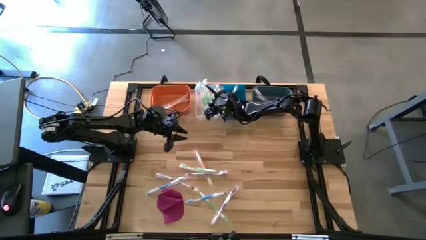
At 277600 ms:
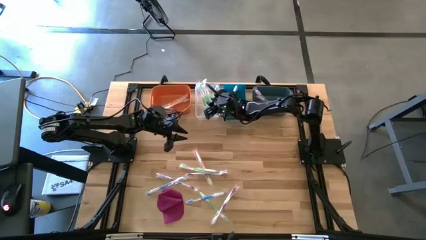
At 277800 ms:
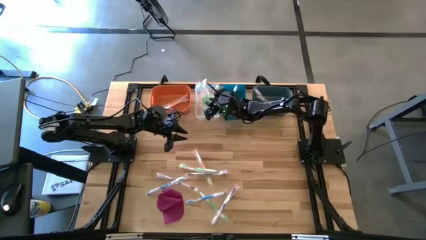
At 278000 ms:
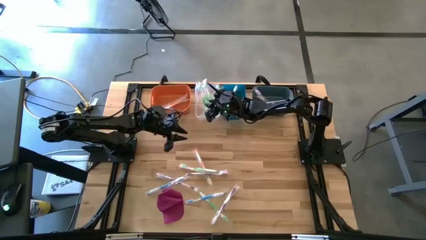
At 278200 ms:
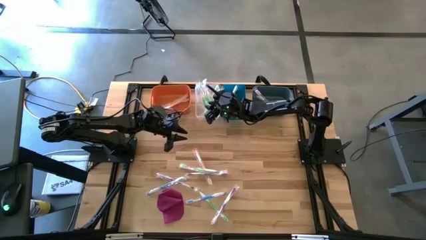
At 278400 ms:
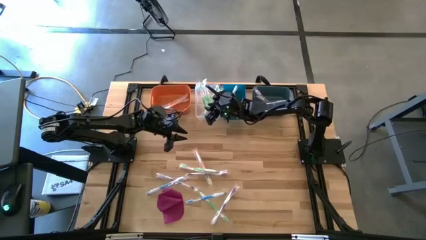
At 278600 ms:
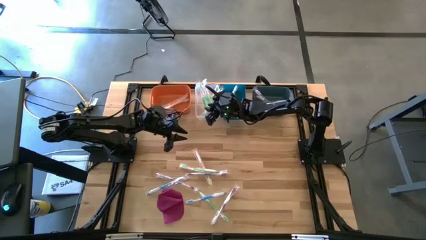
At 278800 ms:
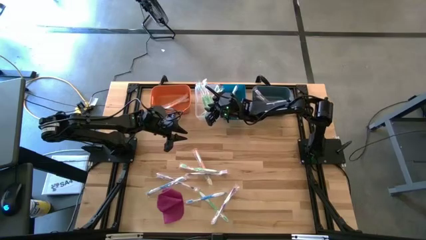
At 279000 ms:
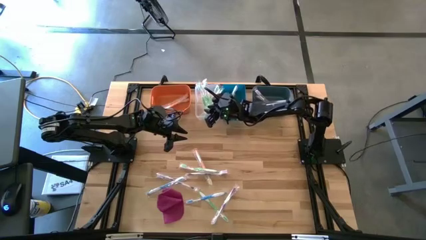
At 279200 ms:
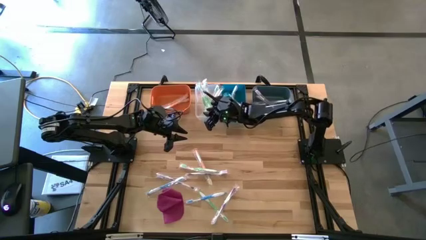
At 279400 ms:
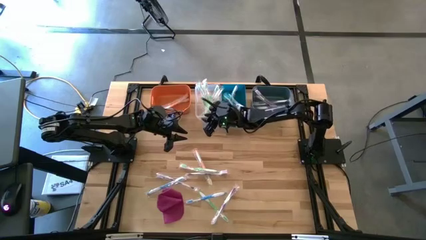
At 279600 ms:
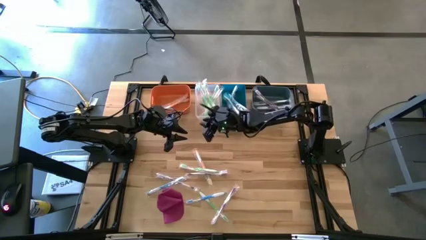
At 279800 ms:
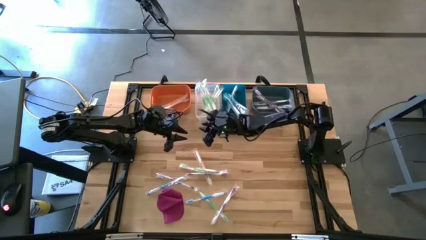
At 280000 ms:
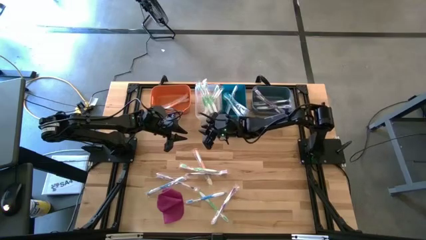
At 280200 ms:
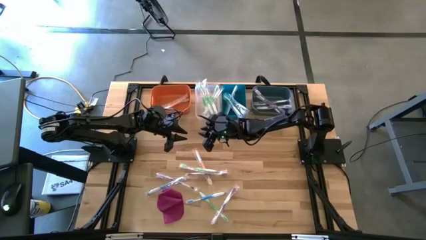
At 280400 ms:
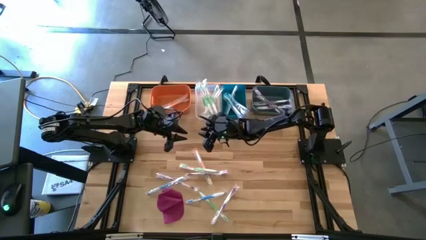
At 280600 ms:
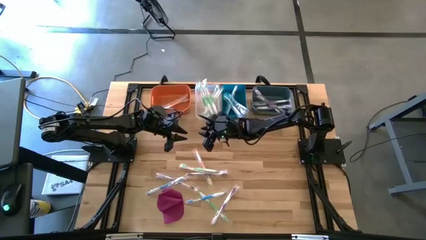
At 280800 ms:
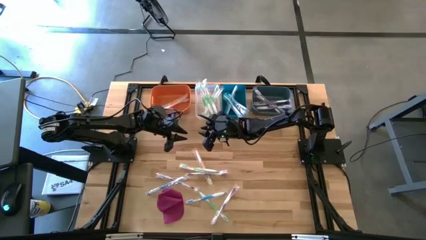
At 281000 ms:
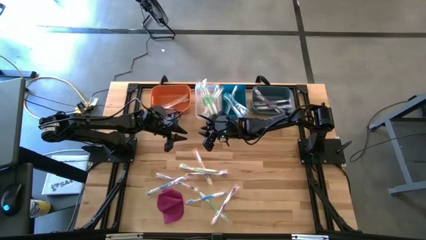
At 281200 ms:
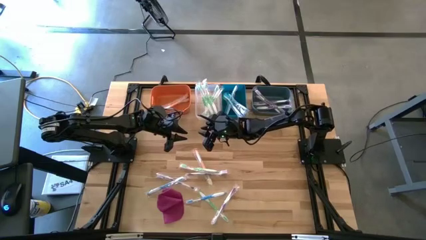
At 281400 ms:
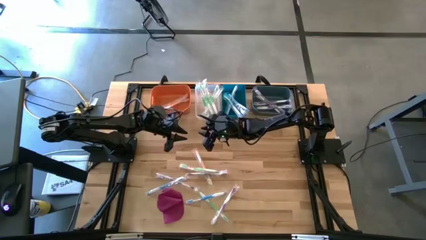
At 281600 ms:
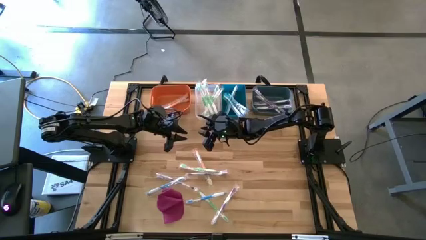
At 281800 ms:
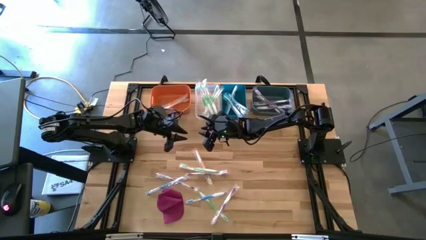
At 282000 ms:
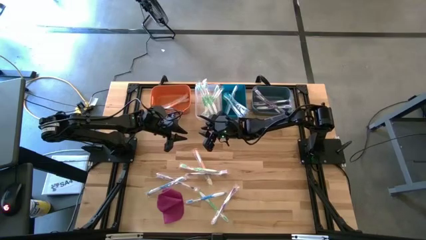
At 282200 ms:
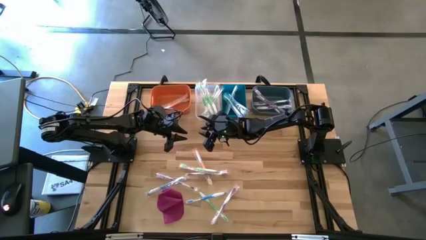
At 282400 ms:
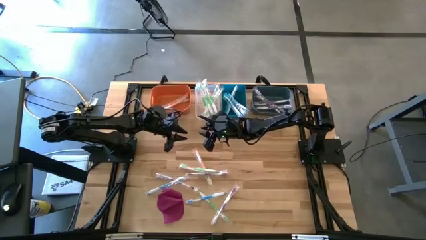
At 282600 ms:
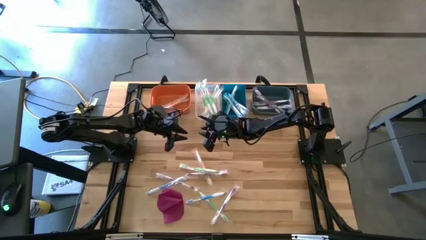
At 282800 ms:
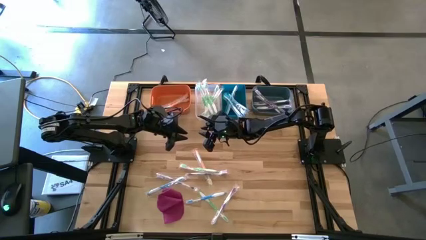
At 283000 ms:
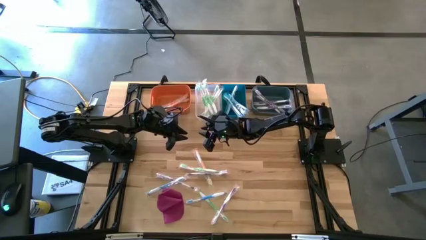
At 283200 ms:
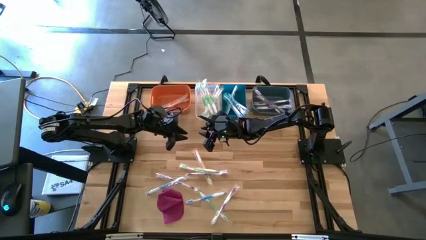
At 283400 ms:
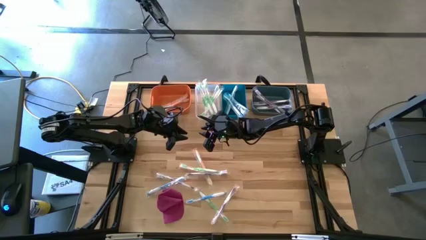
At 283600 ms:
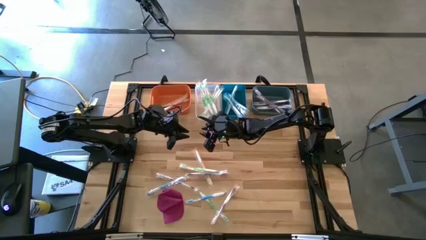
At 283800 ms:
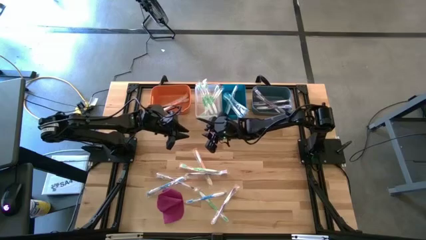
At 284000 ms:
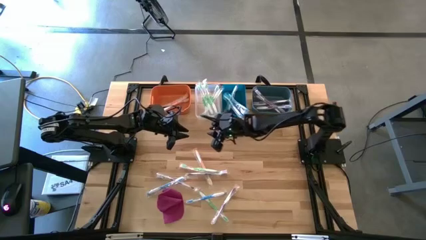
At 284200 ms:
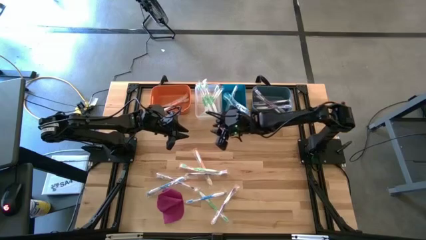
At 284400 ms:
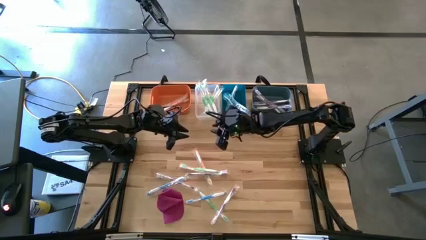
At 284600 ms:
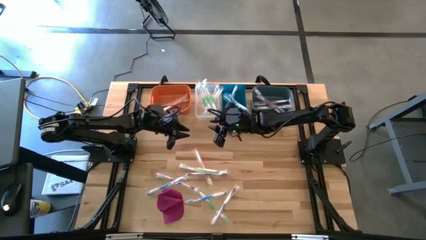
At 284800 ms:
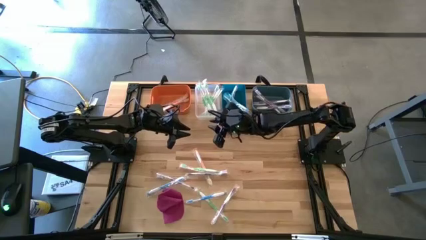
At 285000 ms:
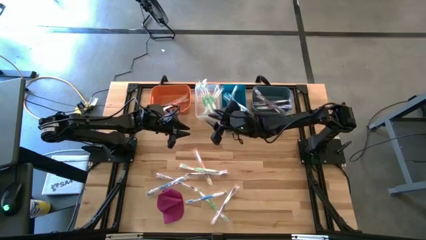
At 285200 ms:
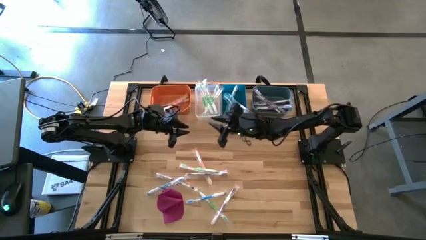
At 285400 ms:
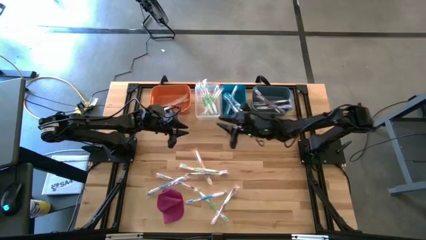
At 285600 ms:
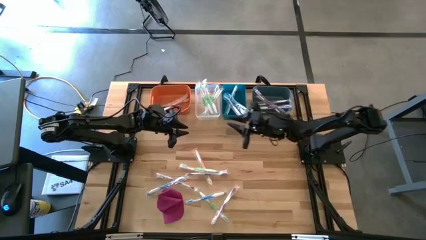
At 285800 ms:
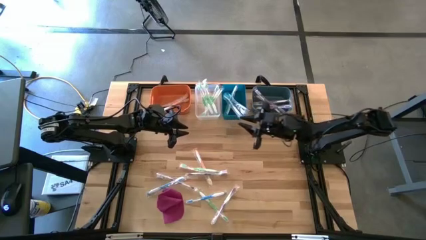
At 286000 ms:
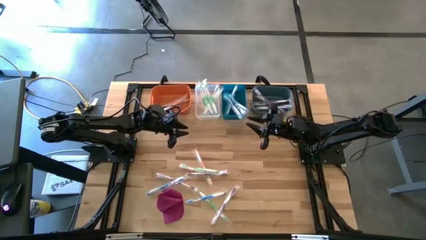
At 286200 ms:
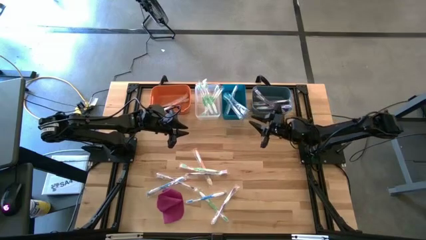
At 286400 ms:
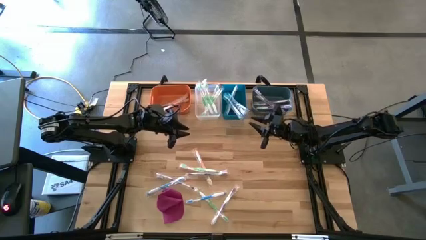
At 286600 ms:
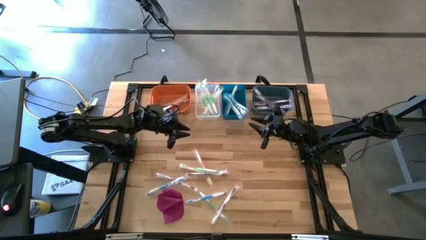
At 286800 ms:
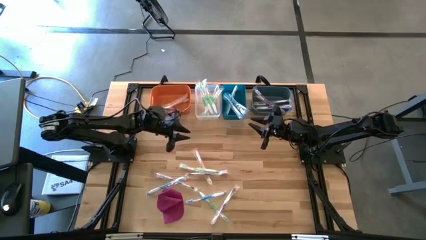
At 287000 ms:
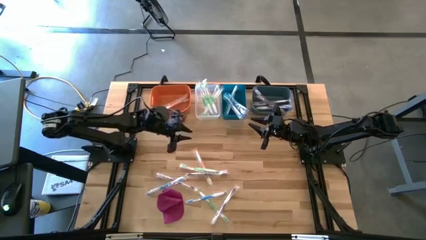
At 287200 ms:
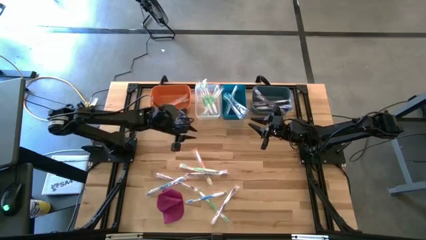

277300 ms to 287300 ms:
Task: Pick & Place Toothbrushes
Put the orange toothbrush into the orange bin
